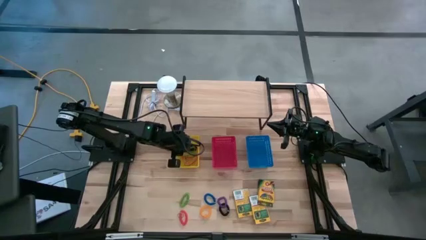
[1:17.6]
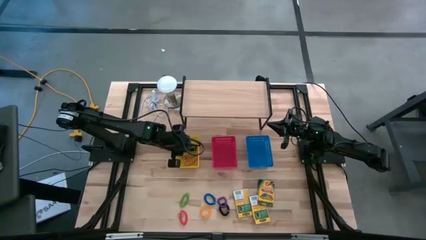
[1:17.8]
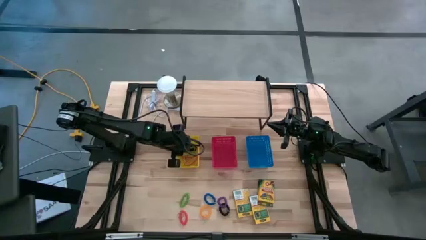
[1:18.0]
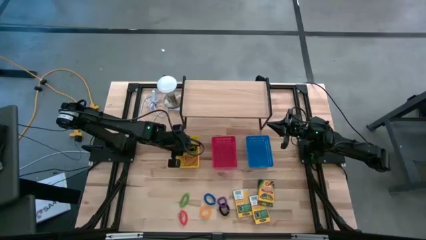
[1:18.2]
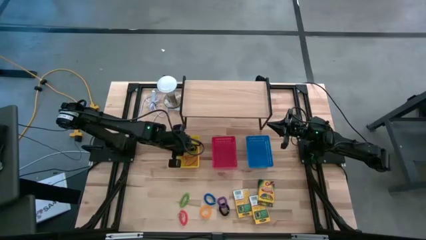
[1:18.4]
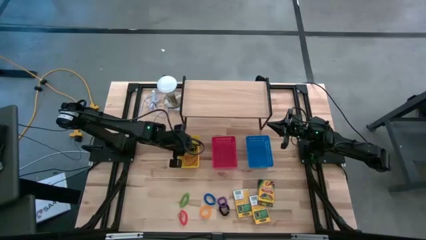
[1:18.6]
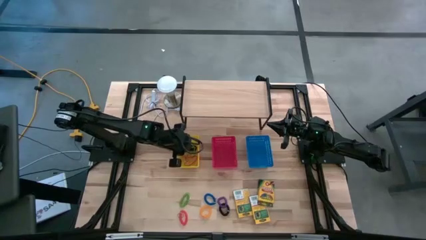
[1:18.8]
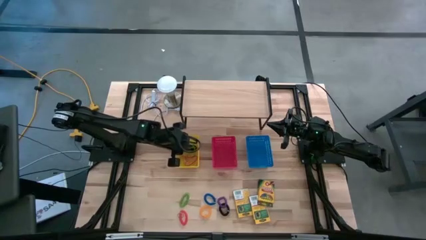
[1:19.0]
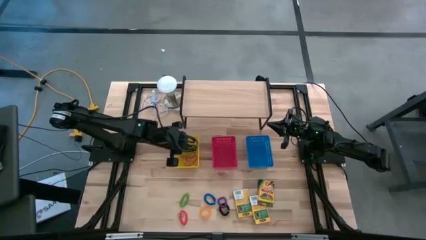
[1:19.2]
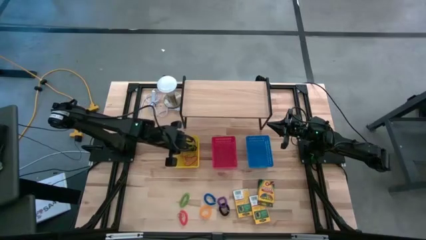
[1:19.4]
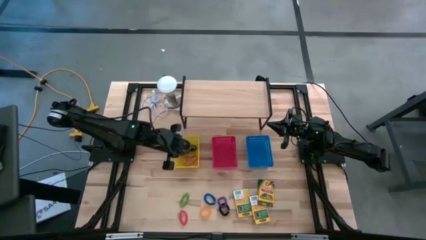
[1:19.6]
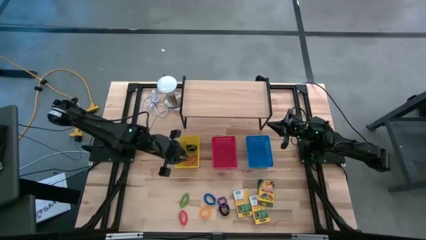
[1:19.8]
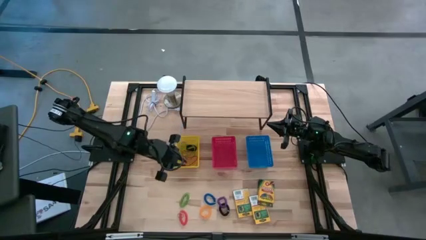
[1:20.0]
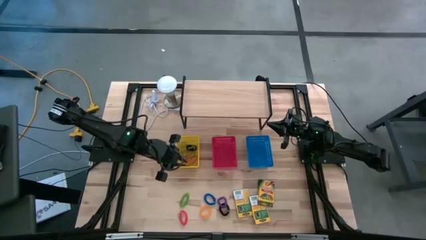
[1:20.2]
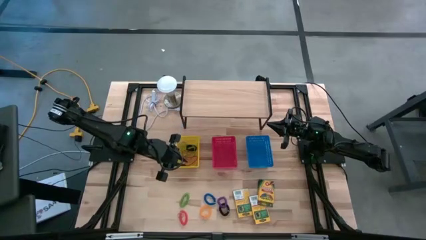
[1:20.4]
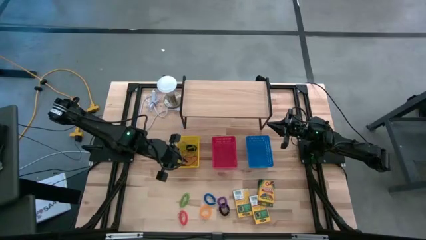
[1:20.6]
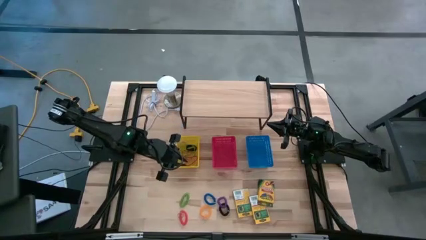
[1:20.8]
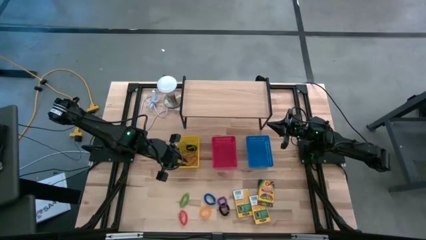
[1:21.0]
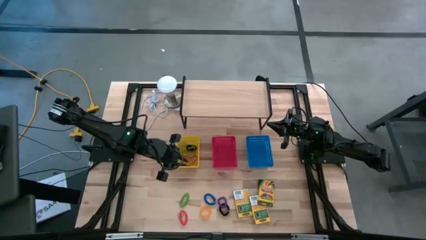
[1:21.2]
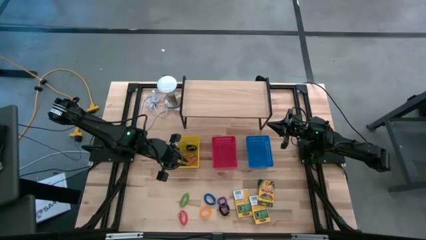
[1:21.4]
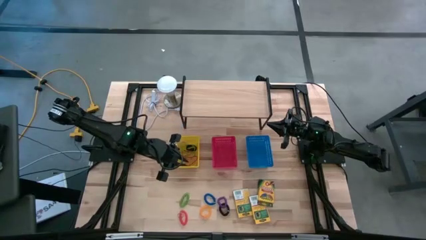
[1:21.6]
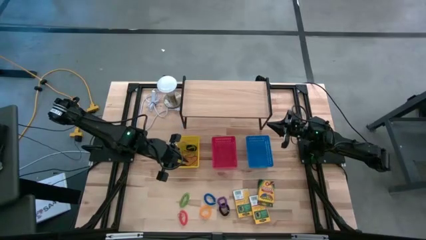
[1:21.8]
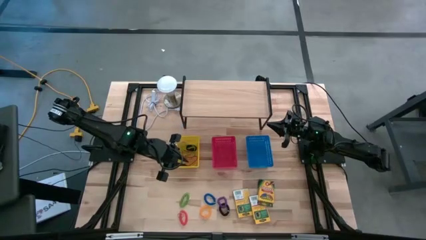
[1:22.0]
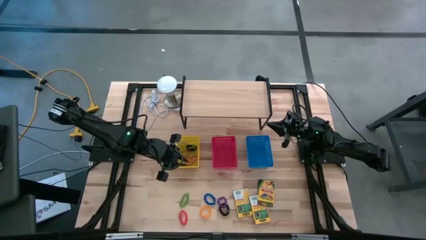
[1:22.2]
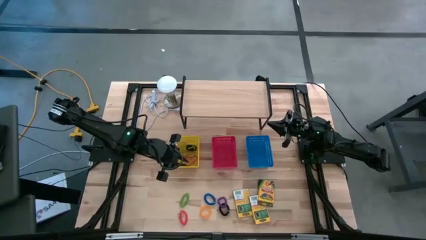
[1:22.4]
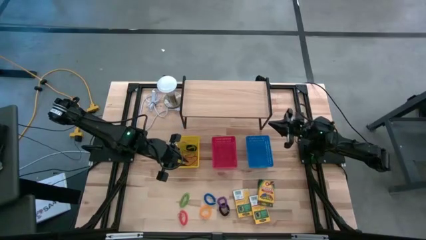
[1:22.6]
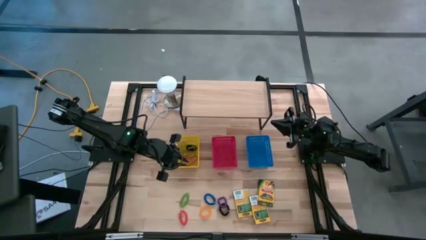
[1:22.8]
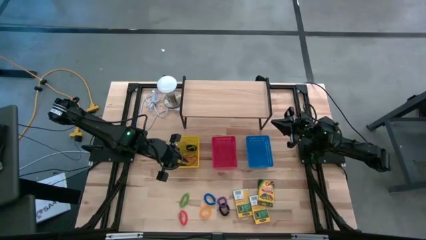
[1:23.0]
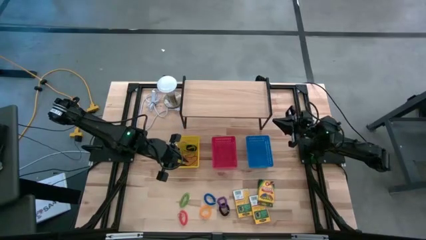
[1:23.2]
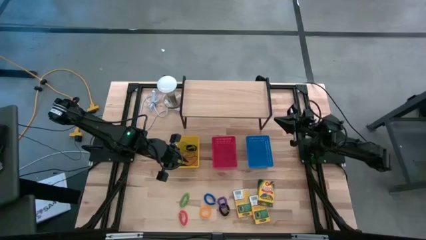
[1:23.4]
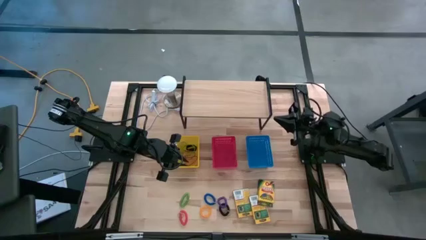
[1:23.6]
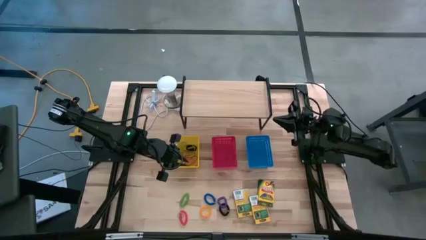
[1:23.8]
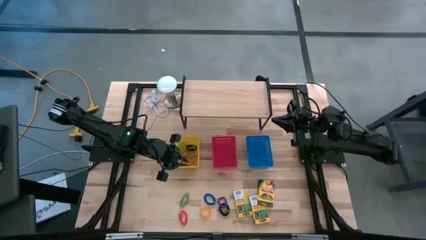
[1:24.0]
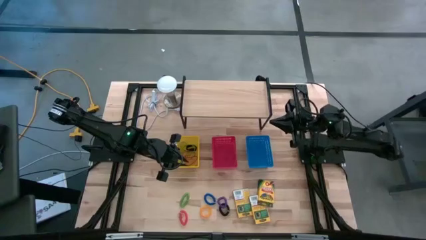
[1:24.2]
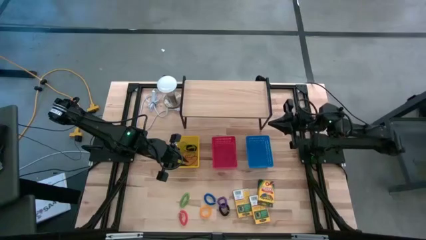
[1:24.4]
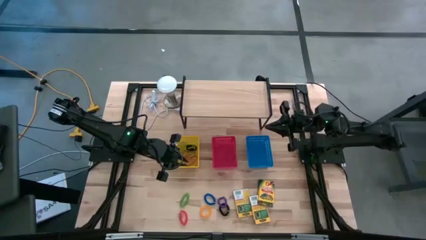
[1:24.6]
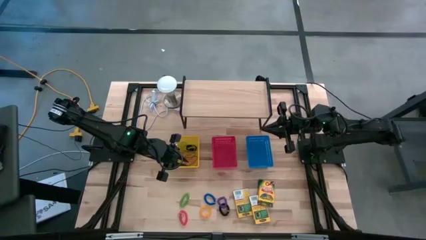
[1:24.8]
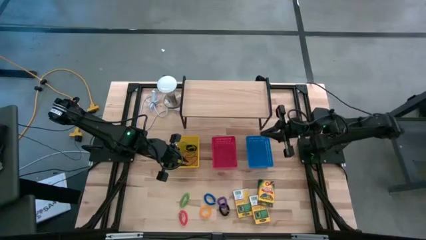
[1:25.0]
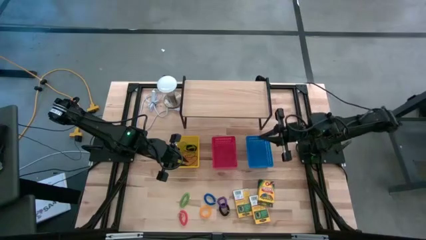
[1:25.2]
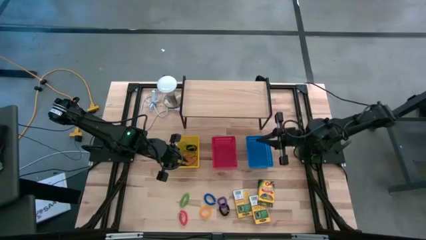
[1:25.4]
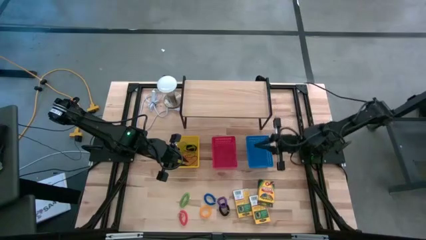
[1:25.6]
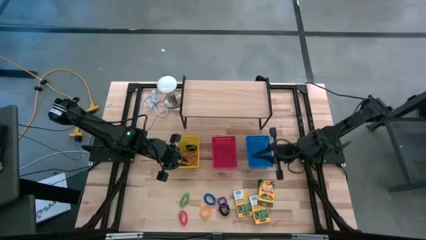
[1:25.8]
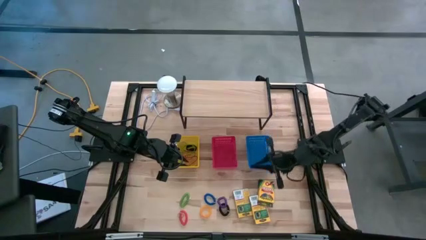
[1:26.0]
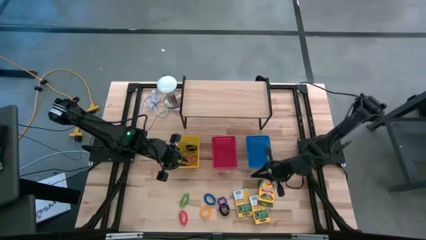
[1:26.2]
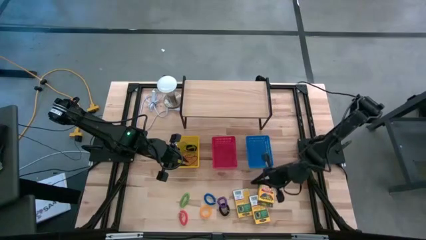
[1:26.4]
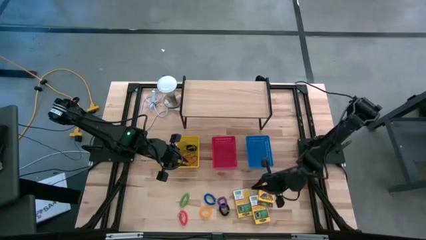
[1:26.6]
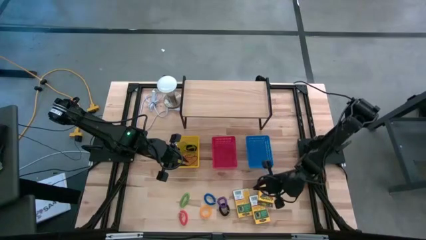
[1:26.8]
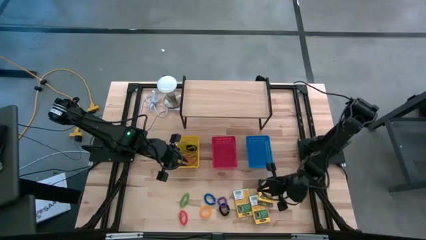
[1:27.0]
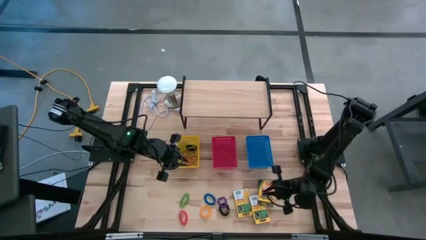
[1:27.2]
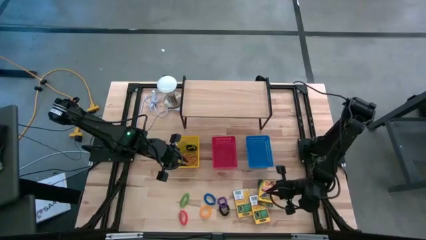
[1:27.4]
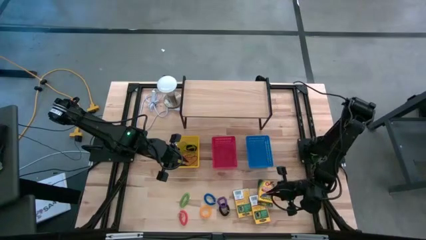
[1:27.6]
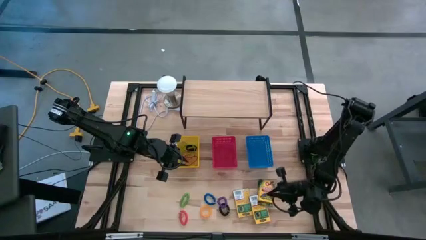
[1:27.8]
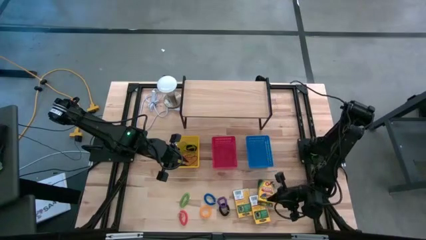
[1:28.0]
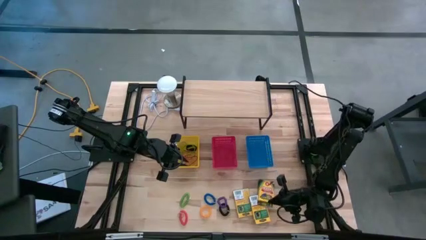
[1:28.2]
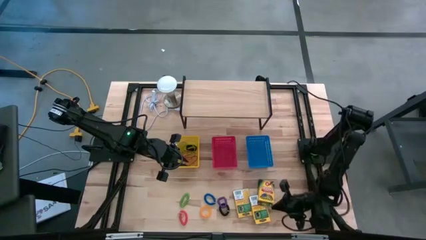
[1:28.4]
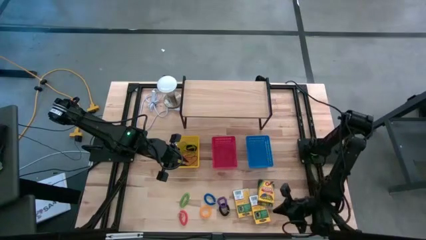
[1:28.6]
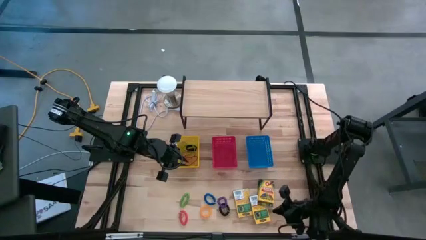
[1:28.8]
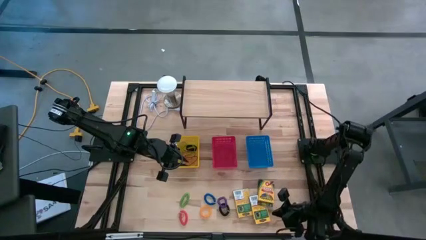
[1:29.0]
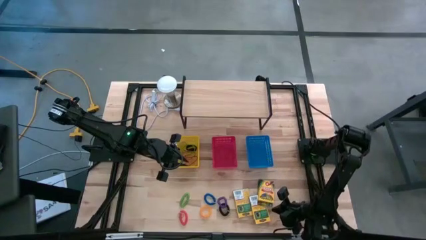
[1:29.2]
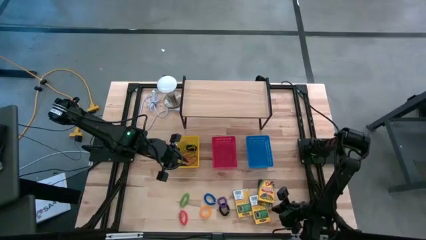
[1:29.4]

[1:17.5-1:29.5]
Task: Pick & Place Office Desk Supplies
Put the yellow crayola box into the red bin
